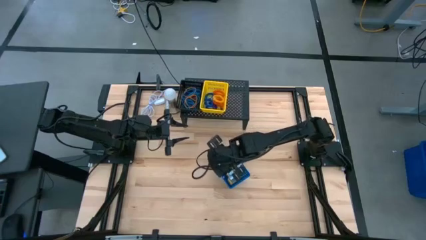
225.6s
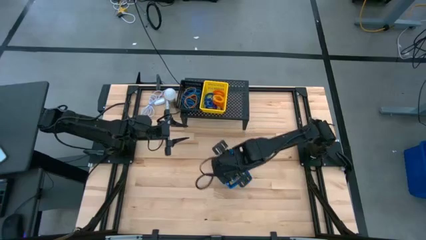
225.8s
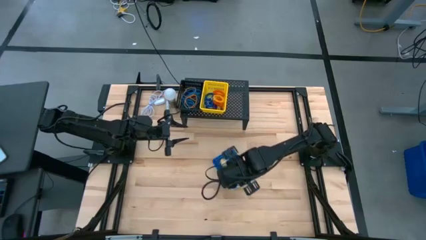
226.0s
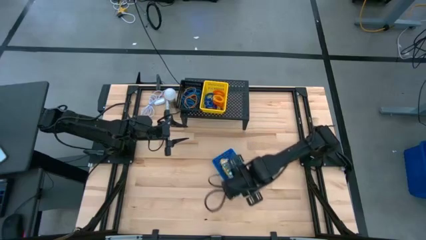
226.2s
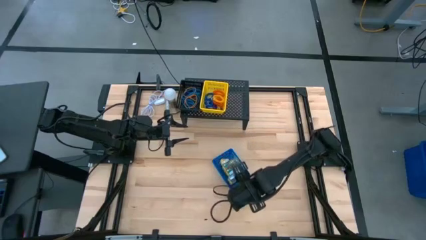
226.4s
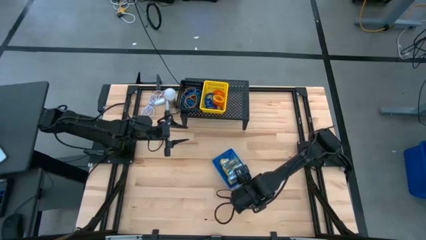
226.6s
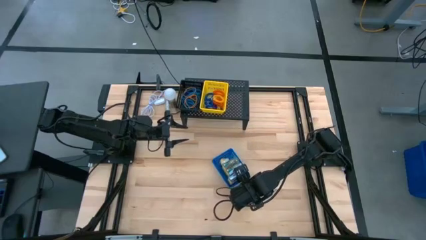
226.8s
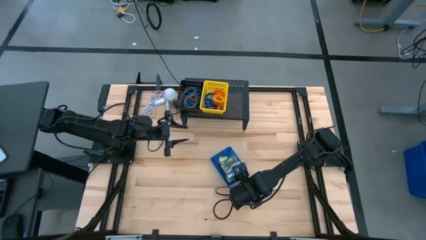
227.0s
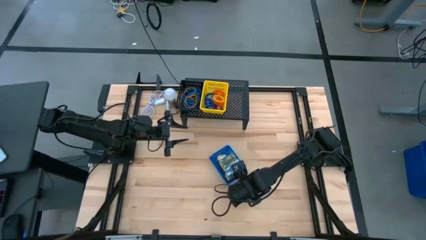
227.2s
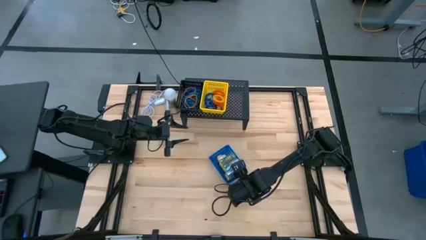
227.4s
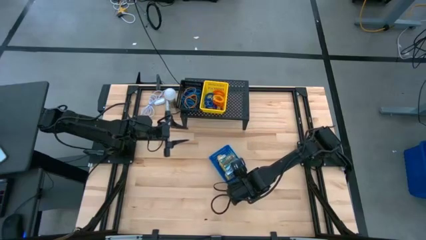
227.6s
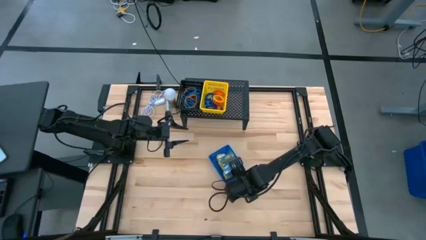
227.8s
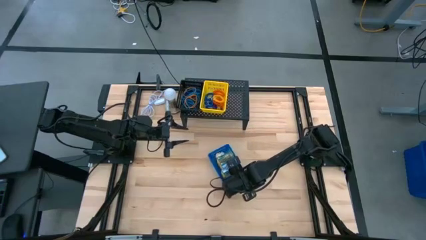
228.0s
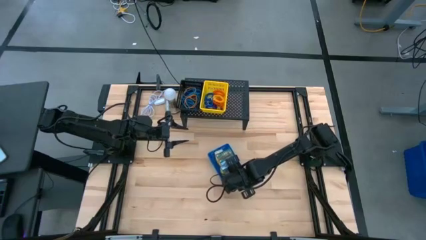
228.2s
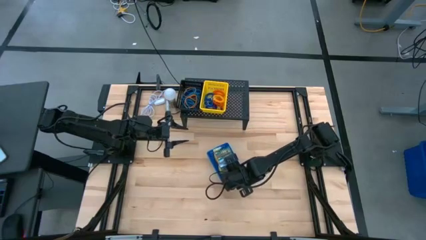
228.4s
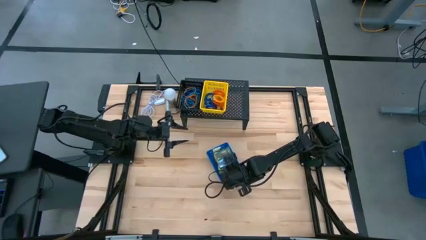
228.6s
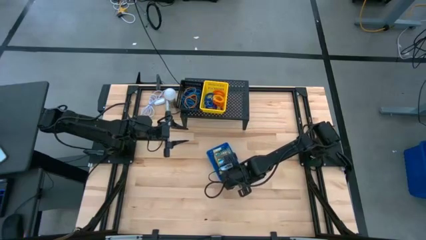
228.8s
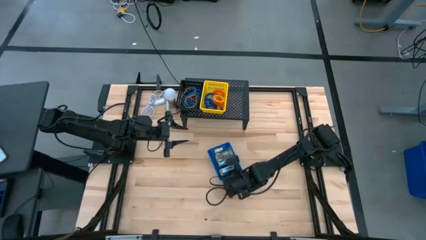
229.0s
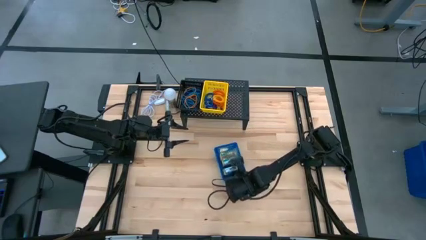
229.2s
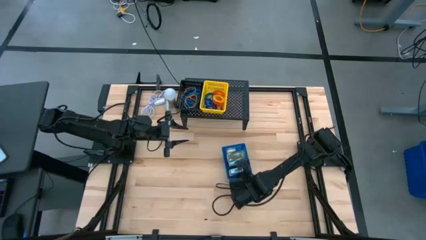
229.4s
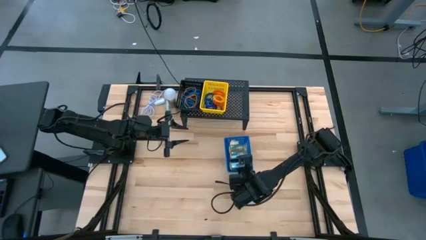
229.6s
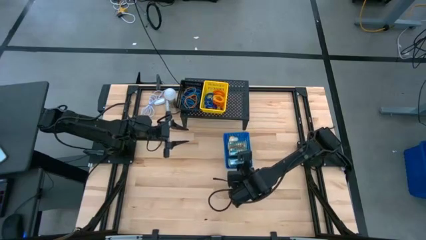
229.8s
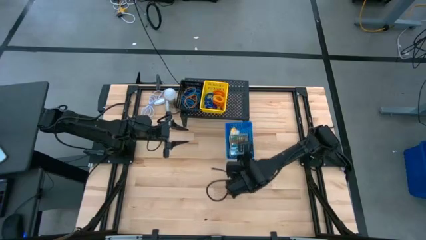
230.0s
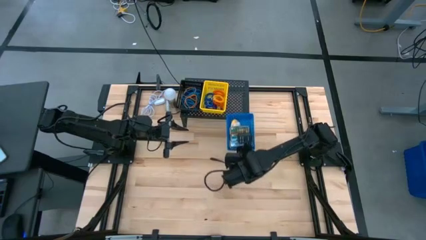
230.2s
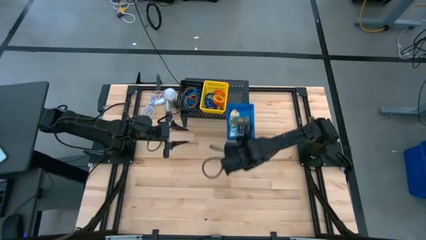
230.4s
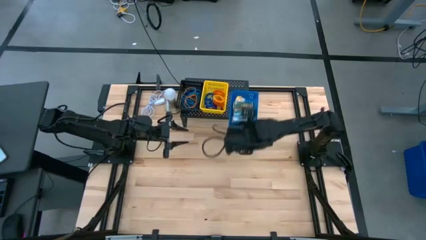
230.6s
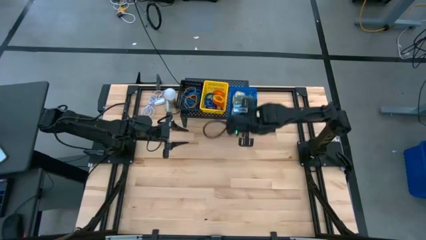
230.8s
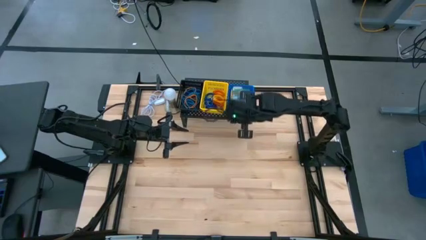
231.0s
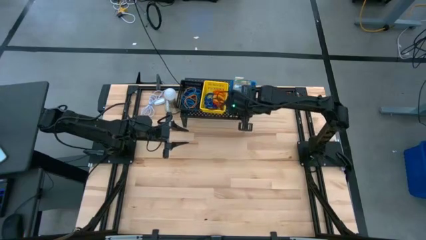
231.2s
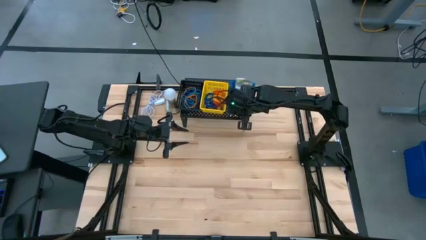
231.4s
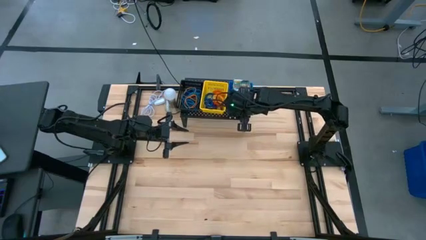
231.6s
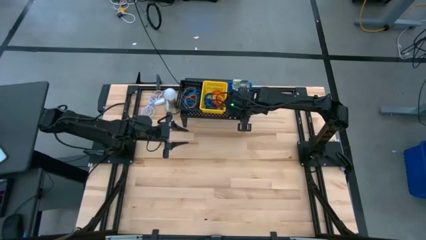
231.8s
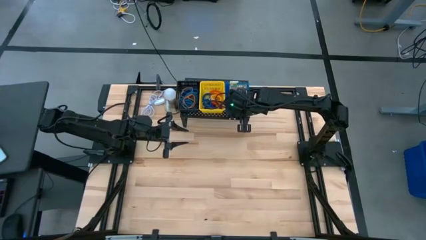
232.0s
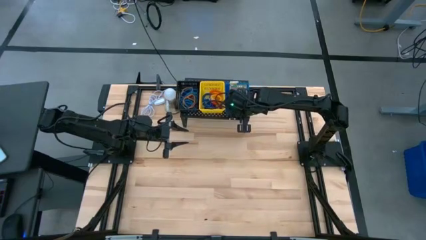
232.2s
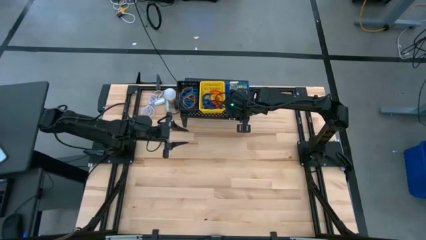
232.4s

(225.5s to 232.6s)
Task: Pick & Place Office Desk Supplies
Put the blue basket on the shelf

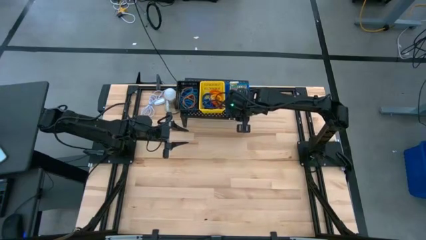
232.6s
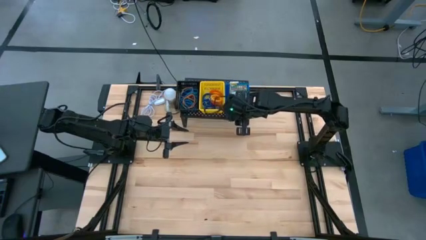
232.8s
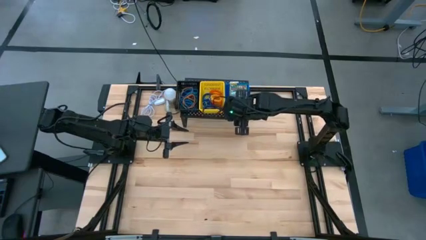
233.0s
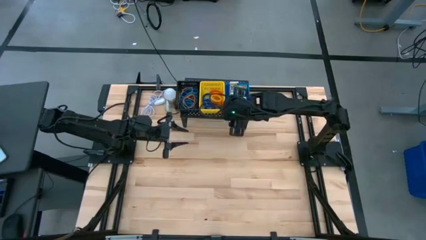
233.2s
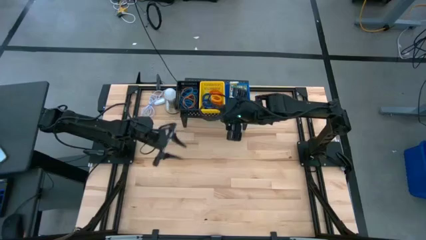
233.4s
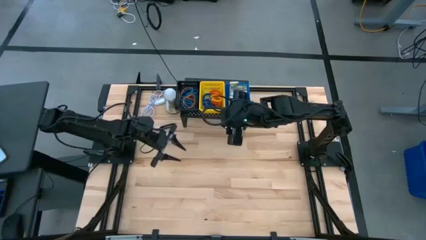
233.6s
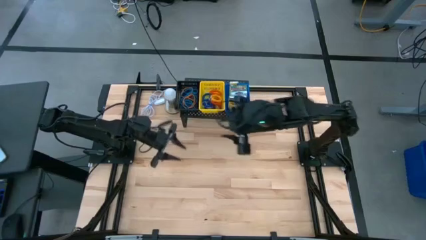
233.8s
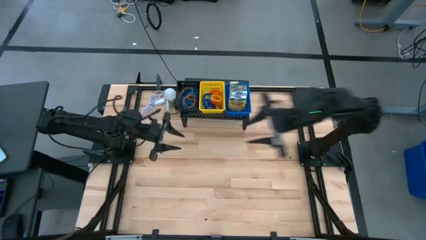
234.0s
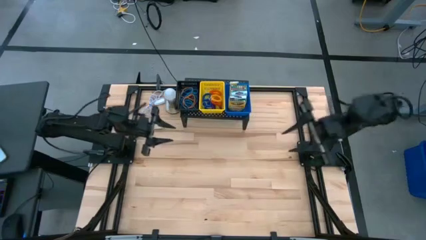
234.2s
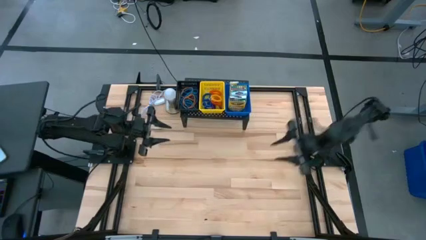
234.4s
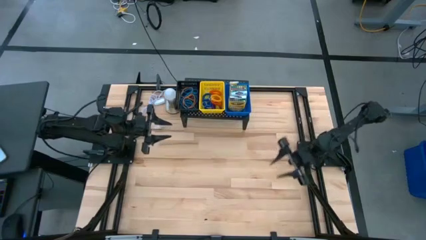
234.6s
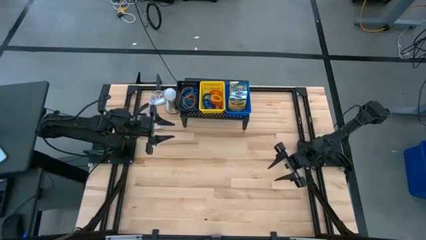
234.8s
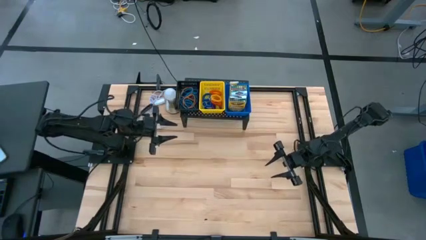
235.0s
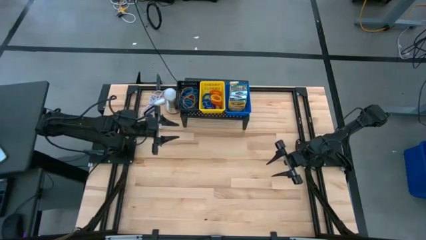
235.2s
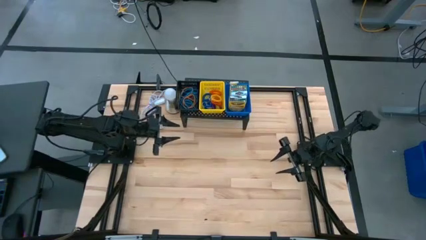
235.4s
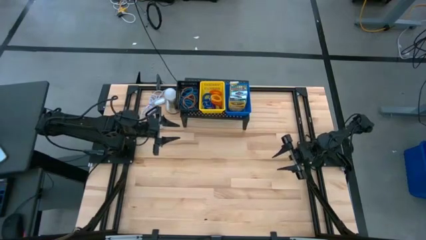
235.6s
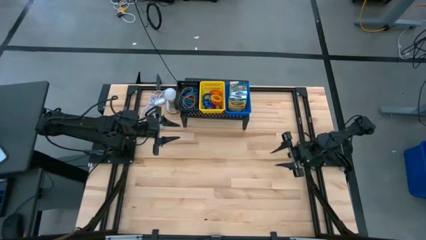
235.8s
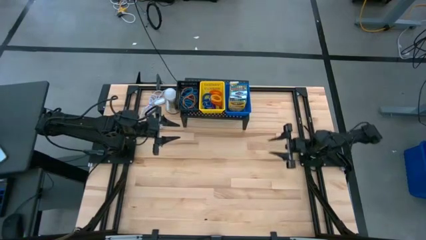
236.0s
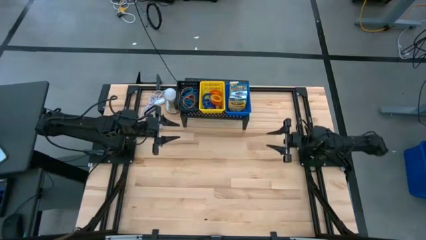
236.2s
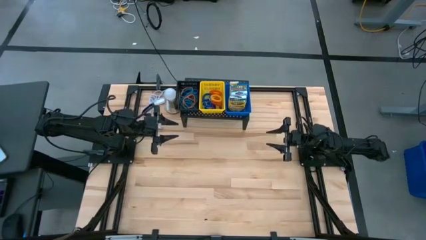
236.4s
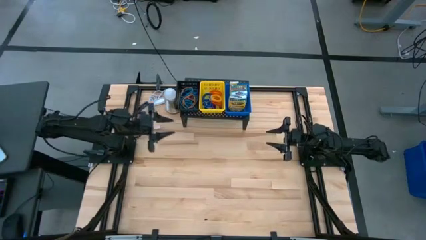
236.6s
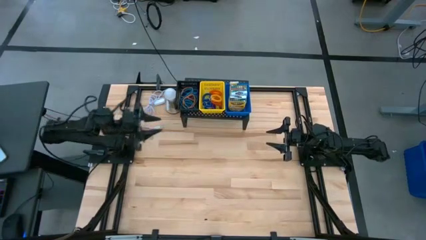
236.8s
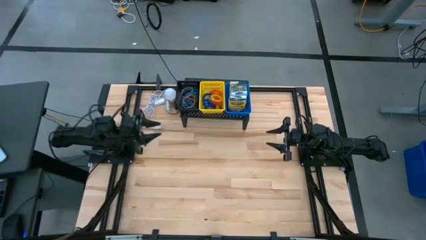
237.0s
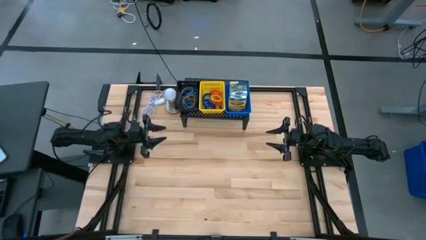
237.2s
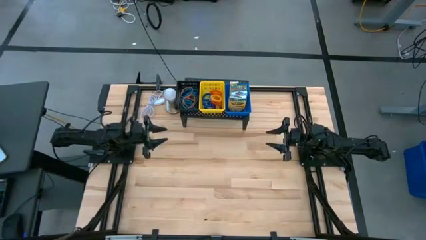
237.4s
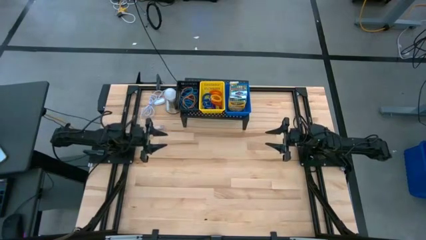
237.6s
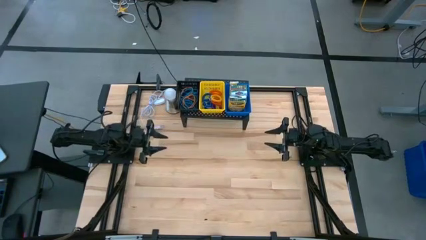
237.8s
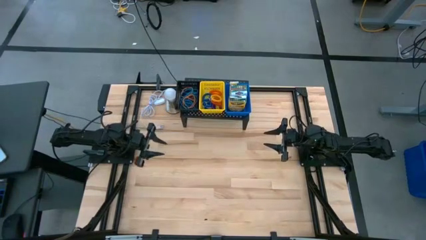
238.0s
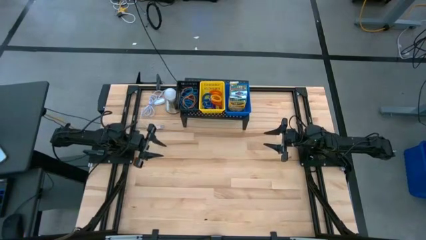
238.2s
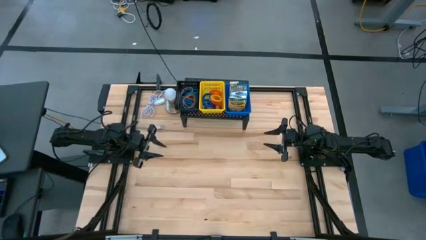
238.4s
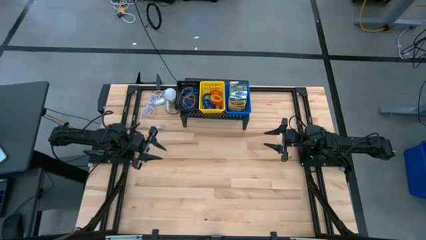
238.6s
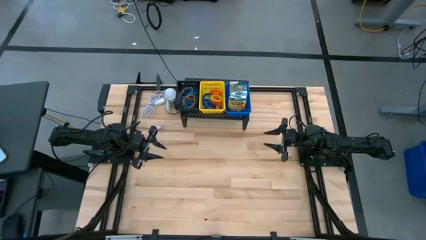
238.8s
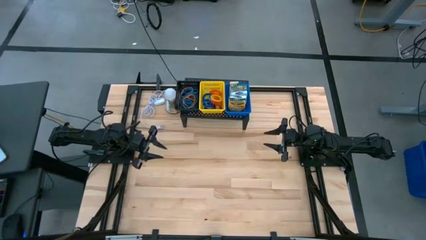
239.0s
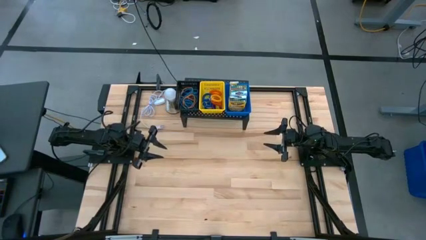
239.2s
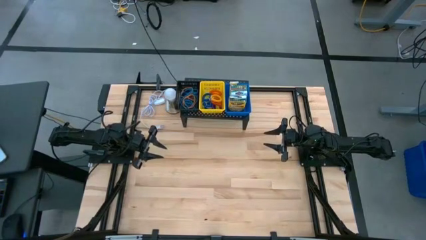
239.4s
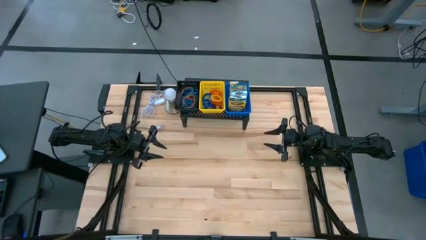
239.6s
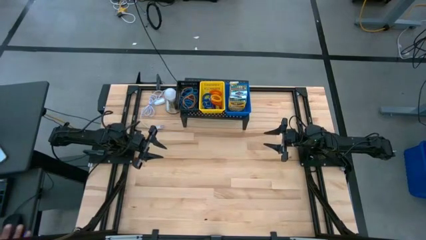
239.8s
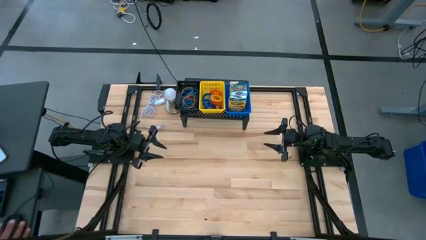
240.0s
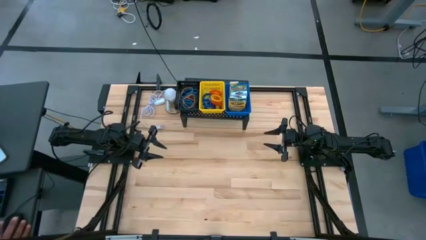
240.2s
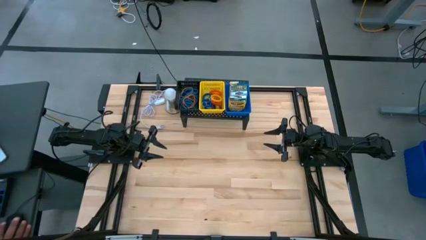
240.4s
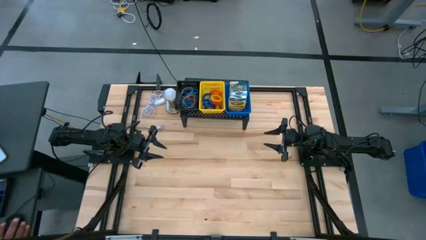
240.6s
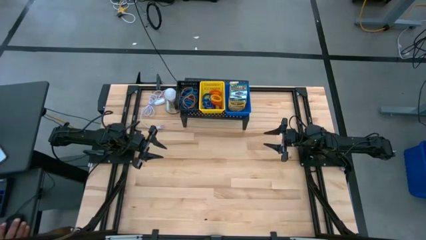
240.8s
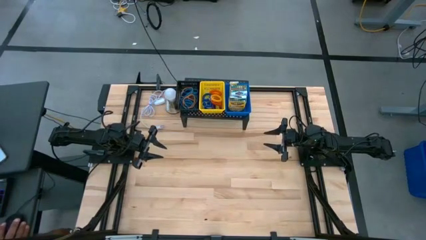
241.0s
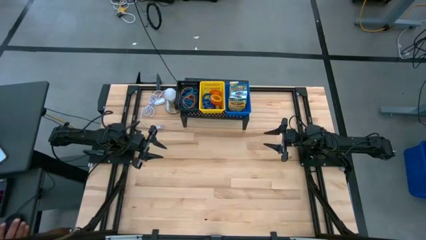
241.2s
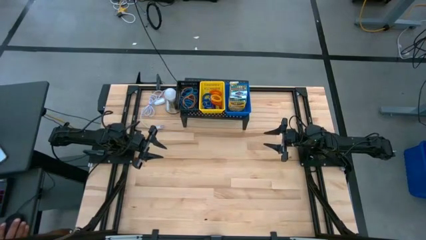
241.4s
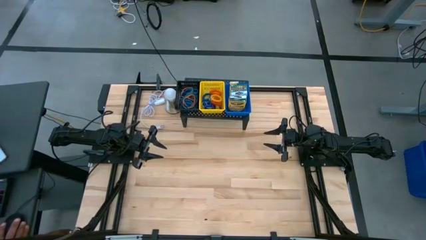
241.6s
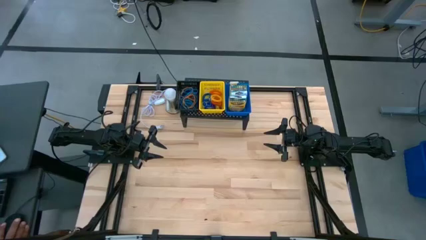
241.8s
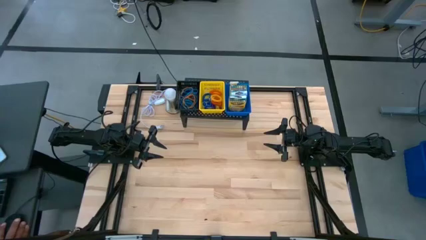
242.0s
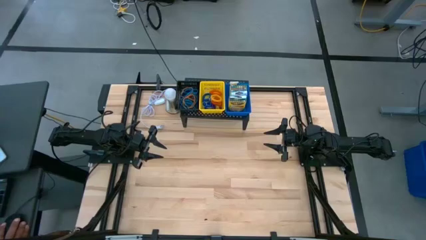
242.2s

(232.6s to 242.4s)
Return to Home Position
